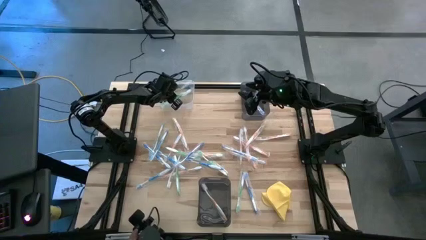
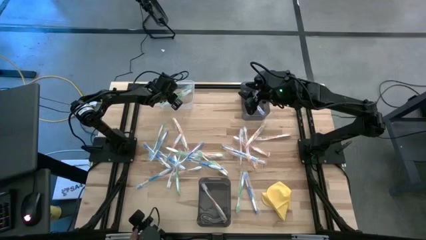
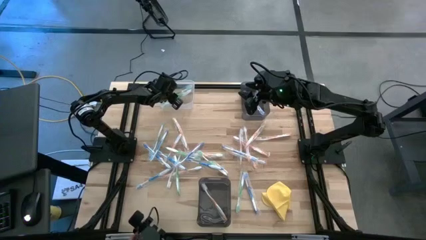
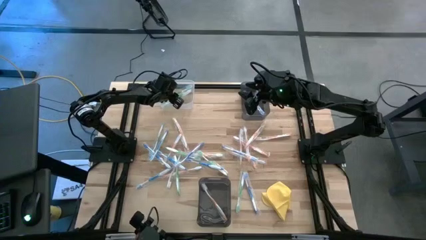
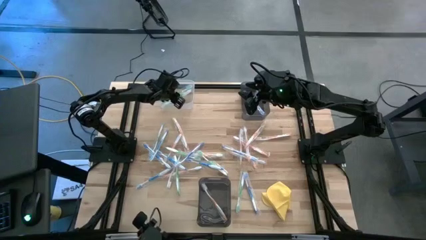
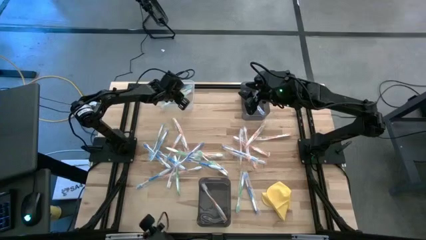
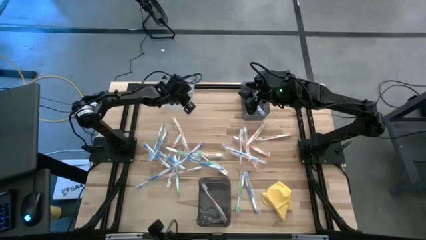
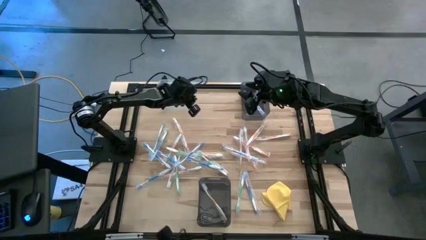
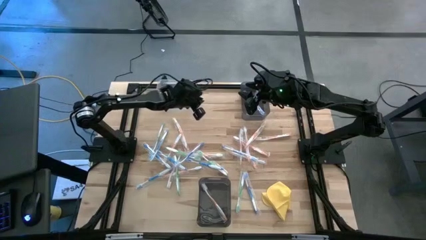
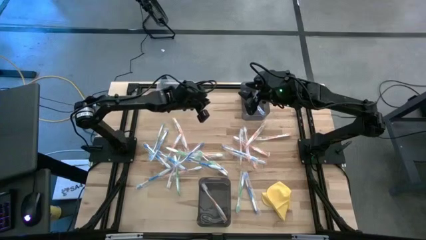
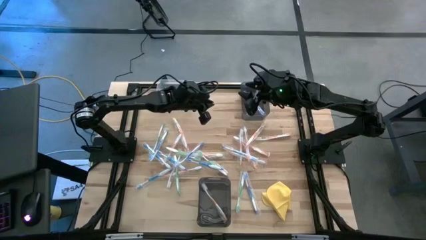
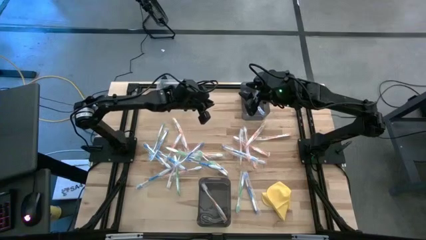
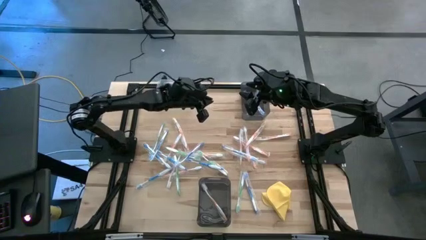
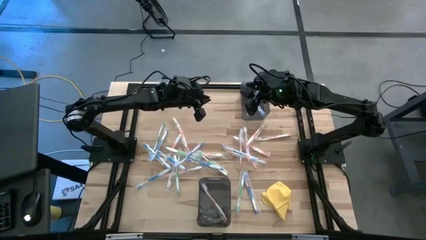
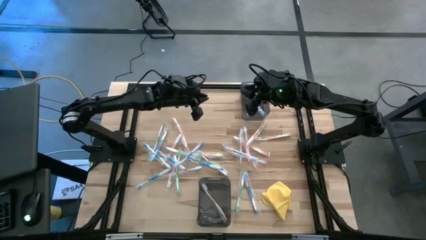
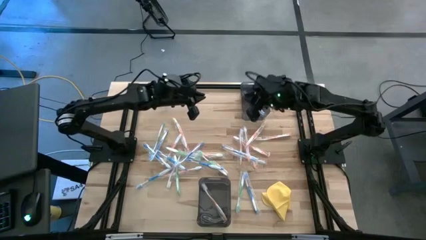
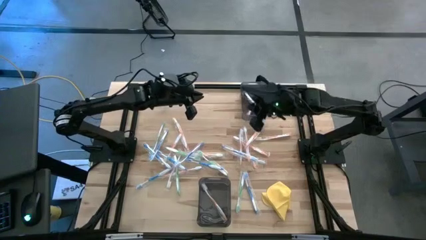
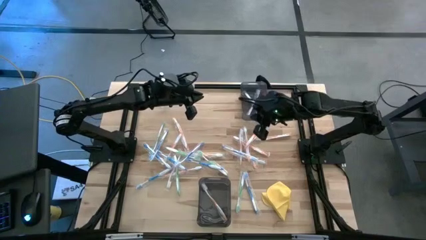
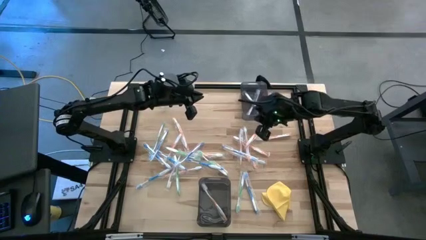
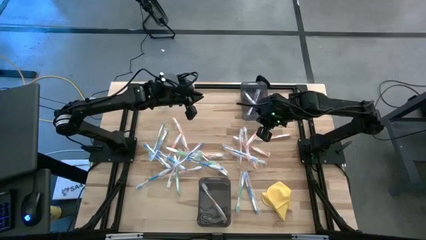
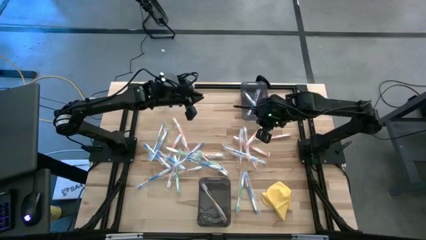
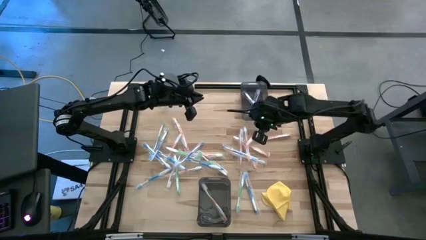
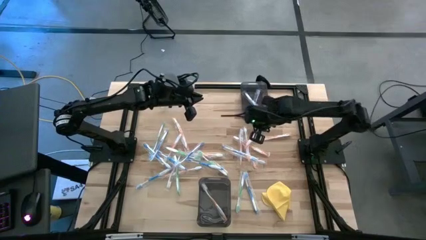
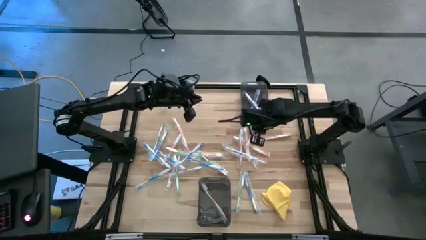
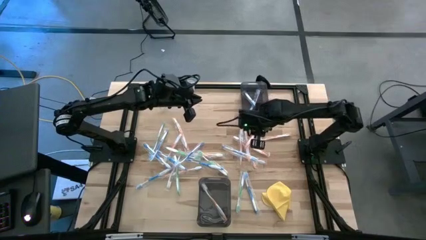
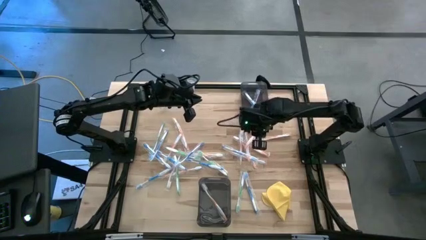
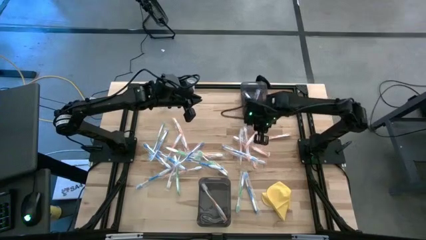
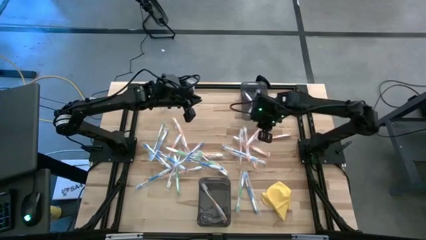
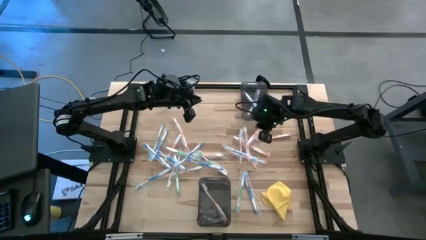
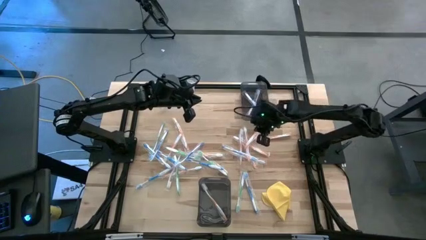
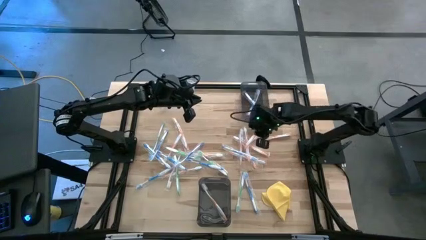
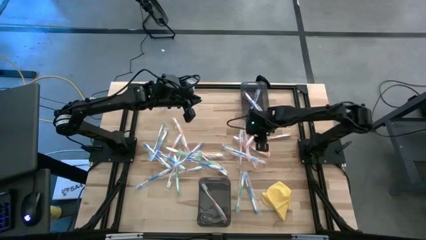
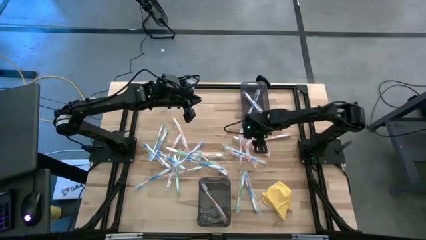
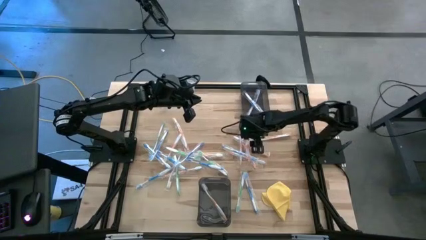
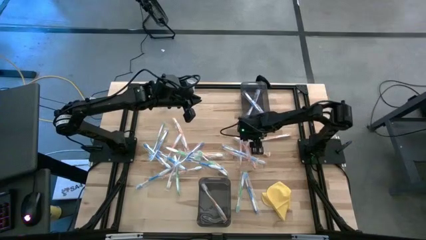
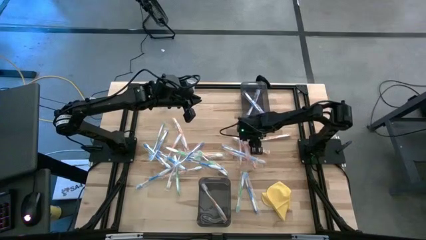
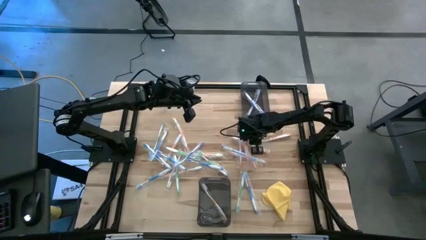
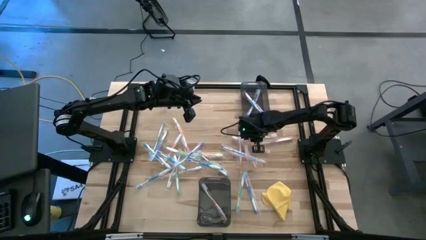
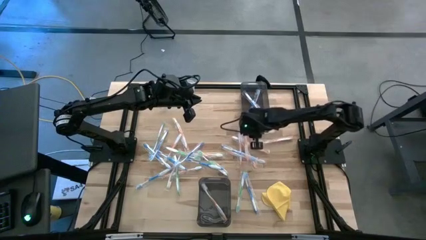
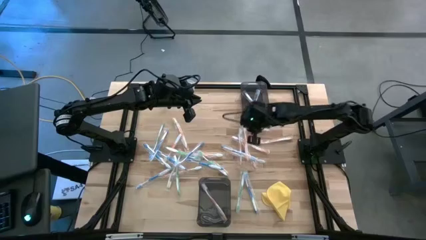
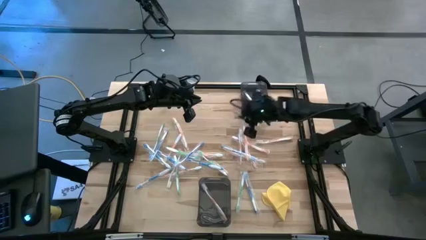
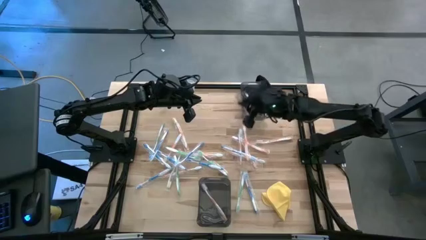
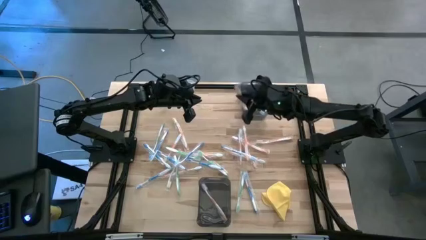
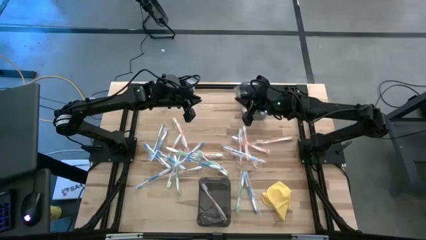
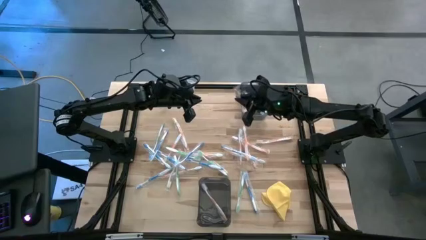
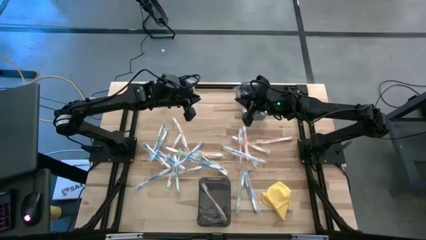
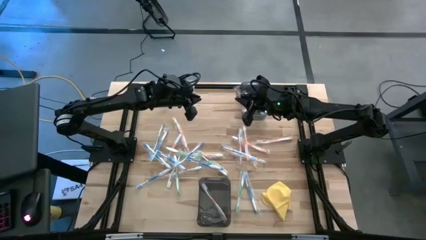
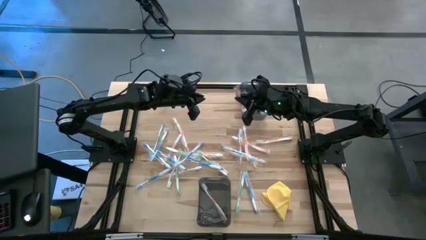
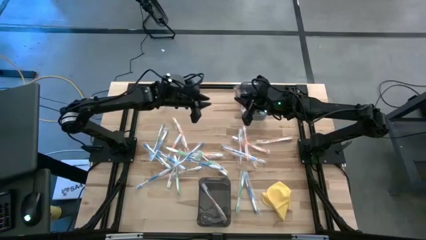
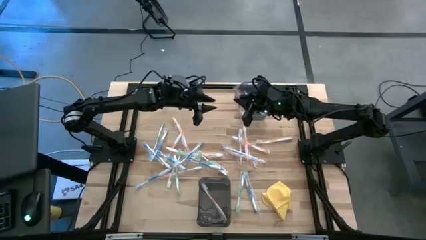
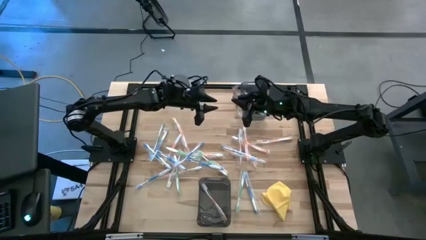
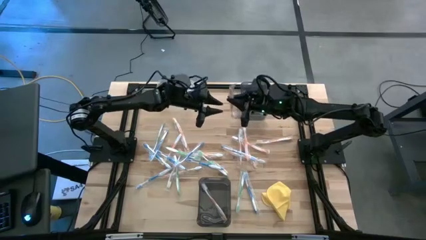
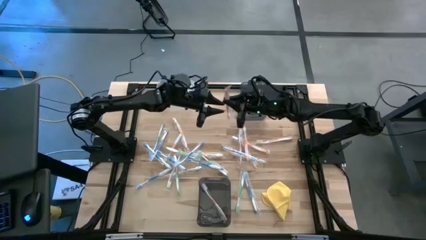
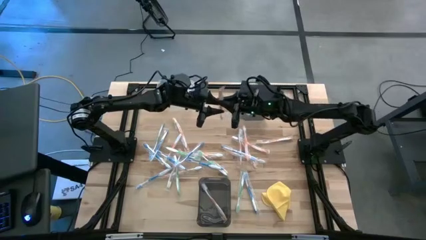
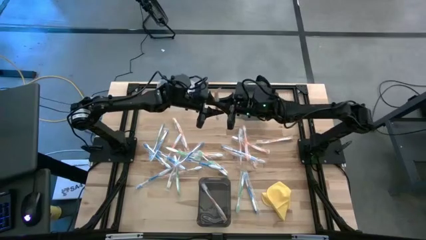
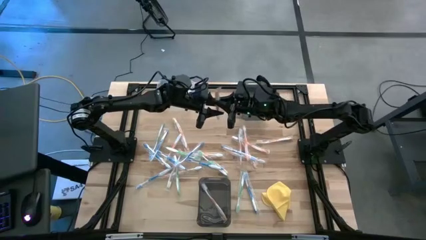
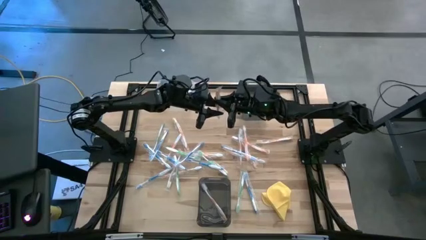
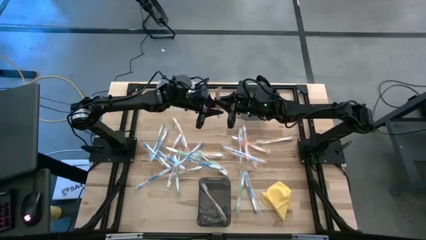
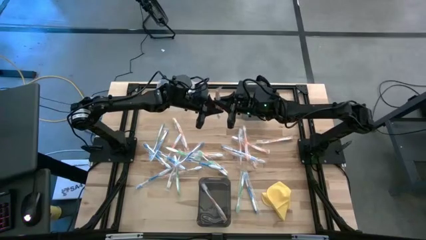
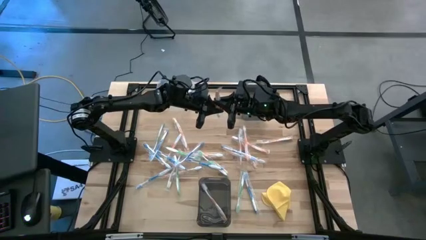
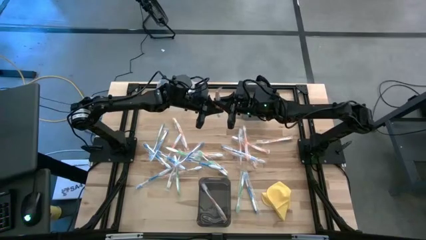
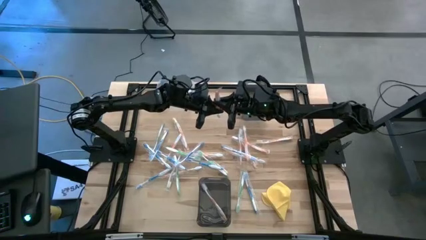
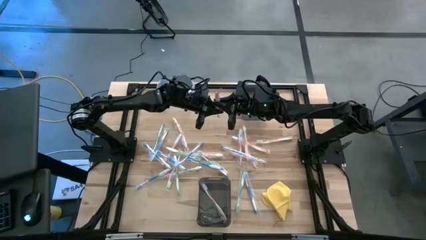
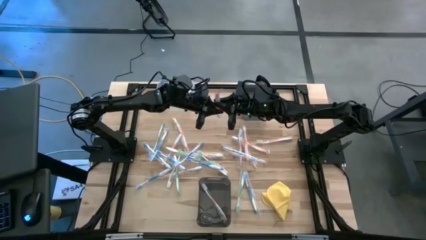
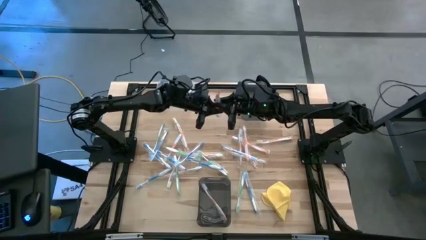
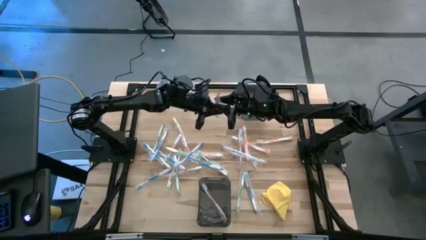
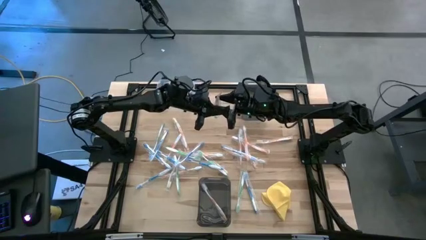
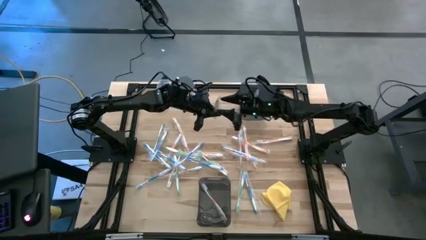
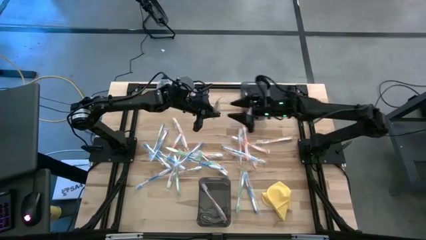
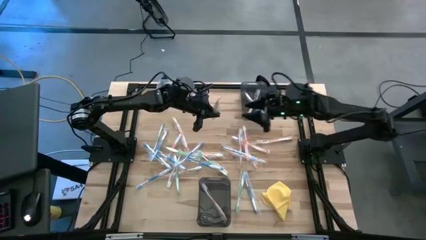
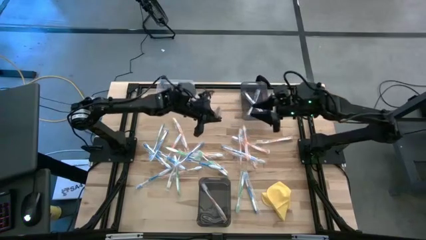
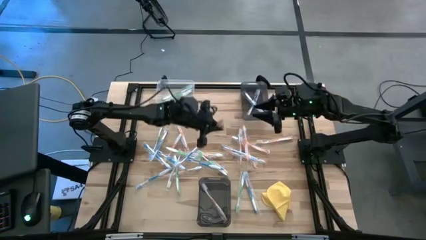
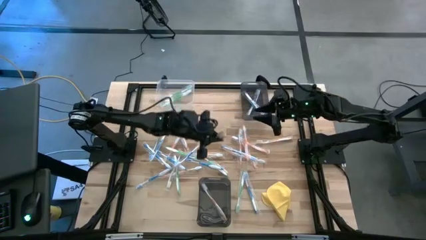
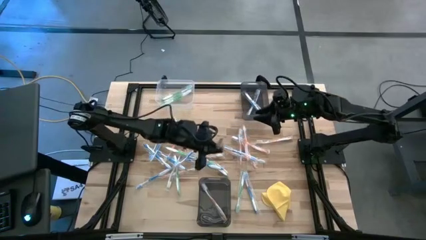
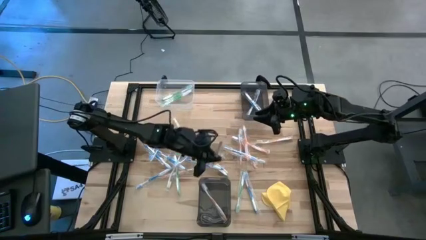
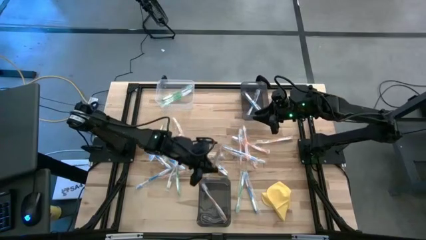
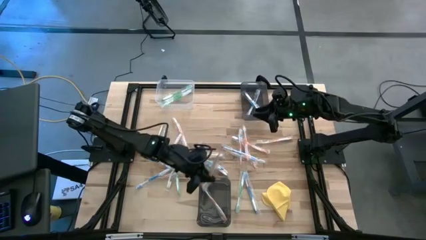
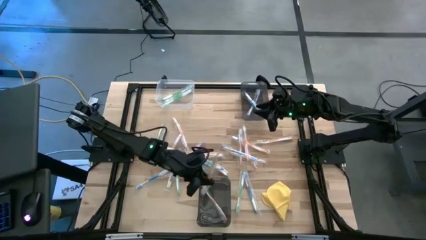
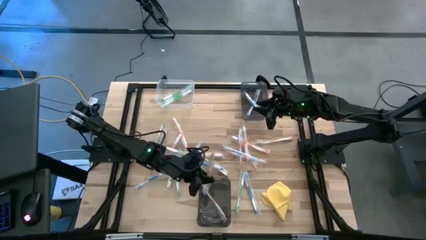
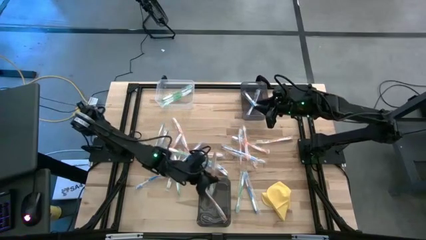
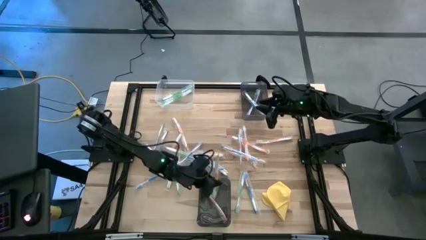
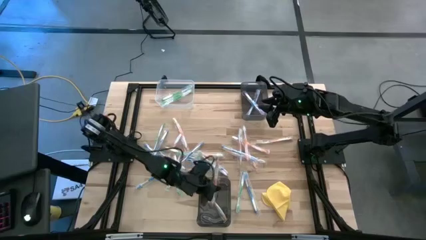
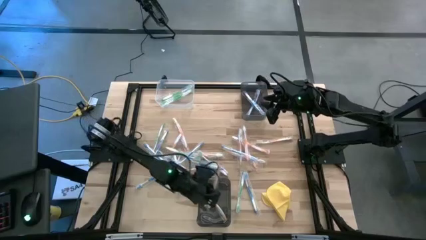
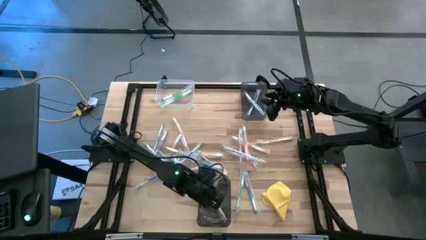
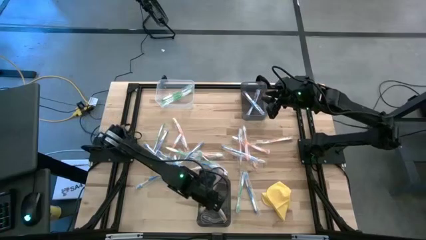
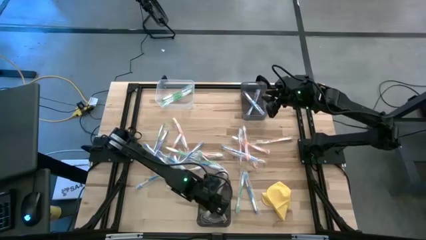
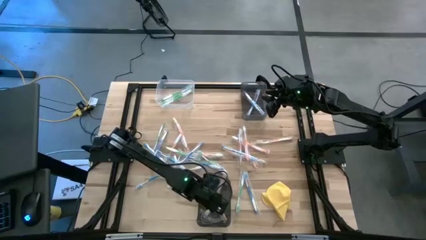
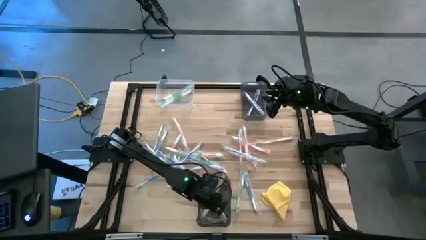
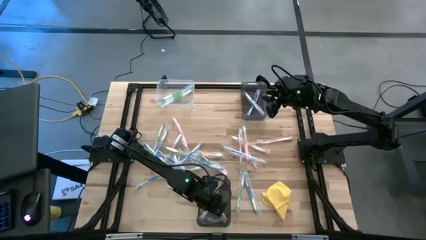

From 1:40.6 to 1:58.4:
Task: Pick & Place Toothbrushes
Put the orange toothbrush into the bottom black bin
